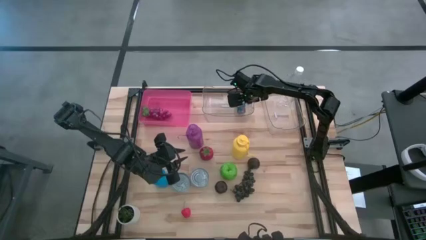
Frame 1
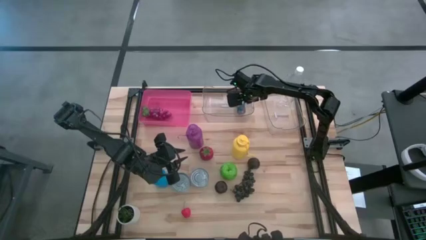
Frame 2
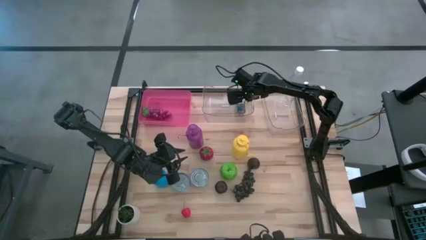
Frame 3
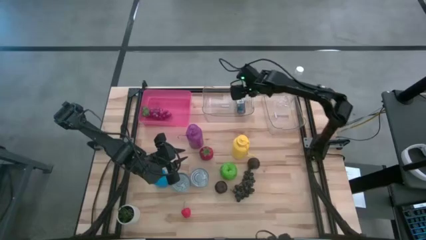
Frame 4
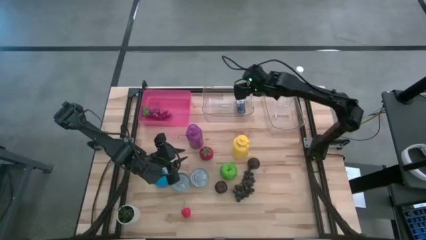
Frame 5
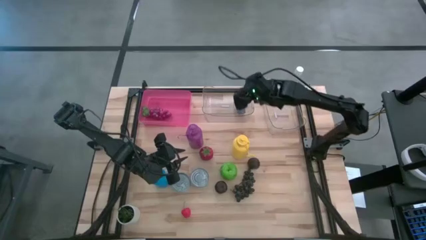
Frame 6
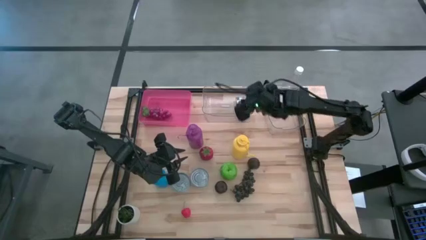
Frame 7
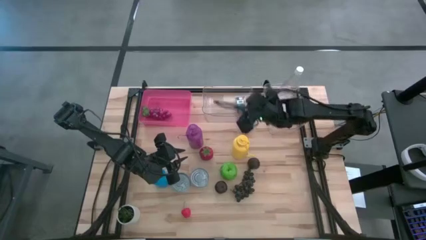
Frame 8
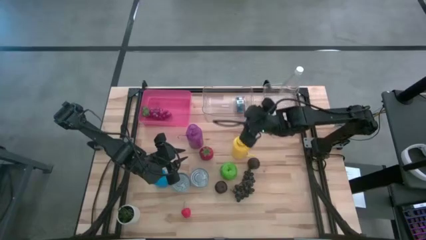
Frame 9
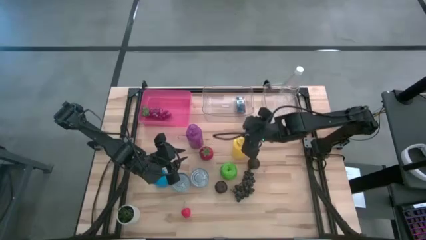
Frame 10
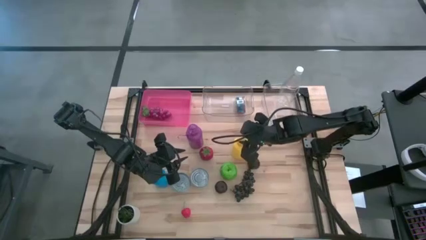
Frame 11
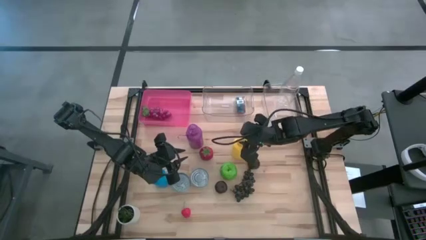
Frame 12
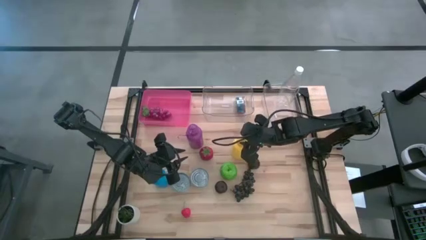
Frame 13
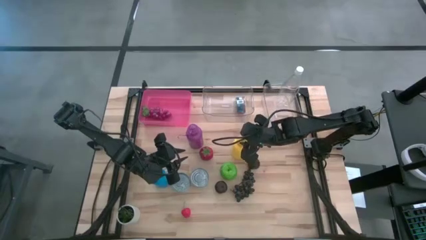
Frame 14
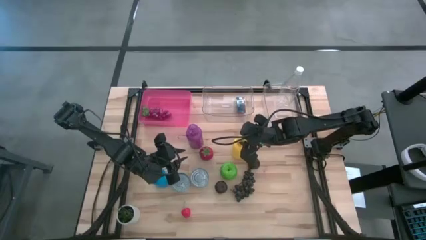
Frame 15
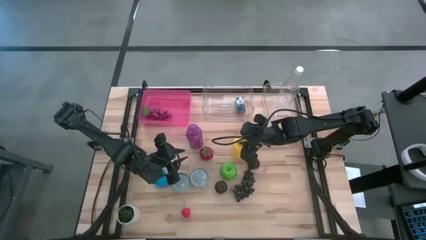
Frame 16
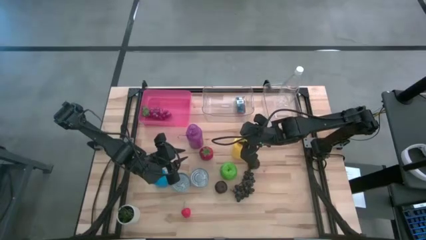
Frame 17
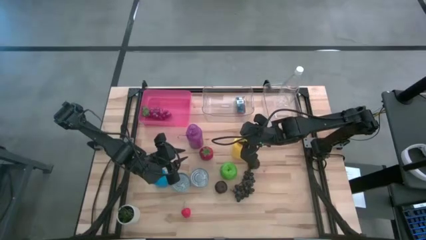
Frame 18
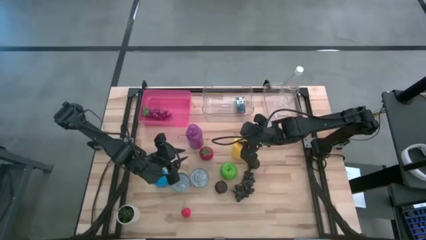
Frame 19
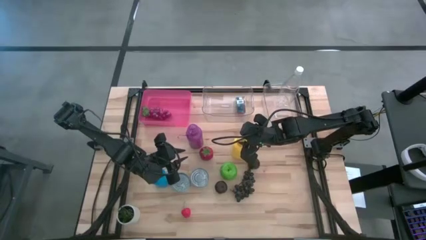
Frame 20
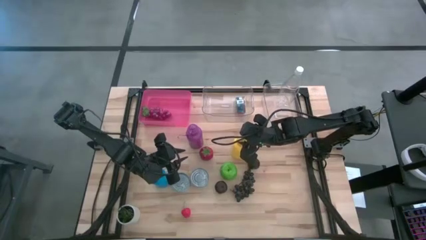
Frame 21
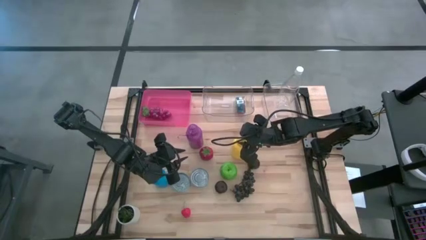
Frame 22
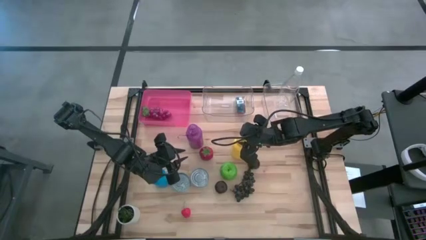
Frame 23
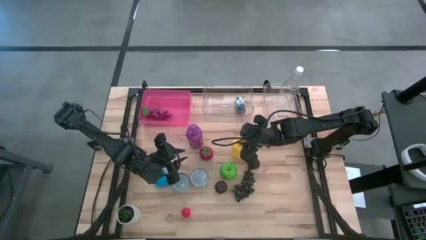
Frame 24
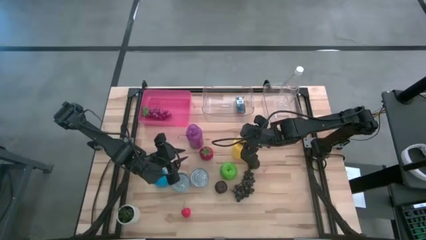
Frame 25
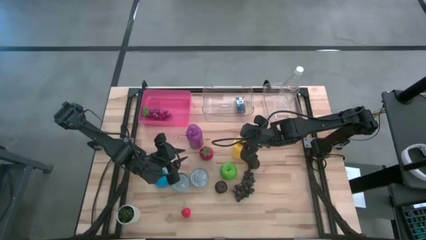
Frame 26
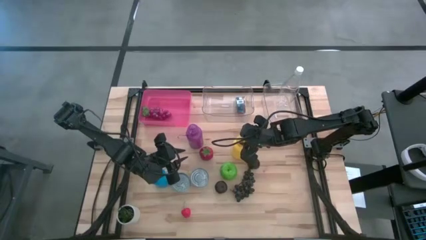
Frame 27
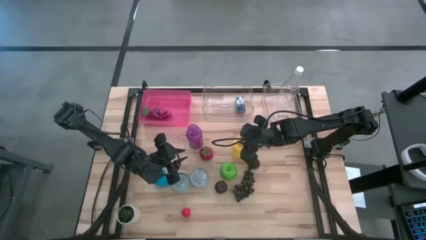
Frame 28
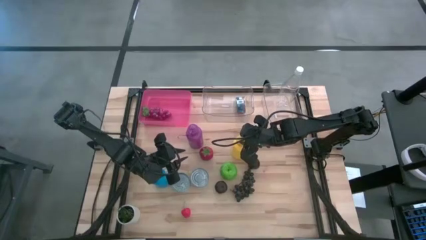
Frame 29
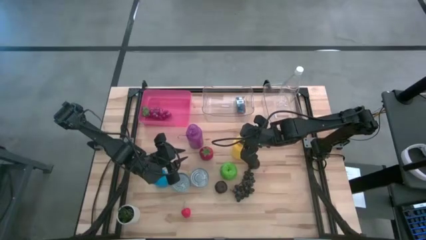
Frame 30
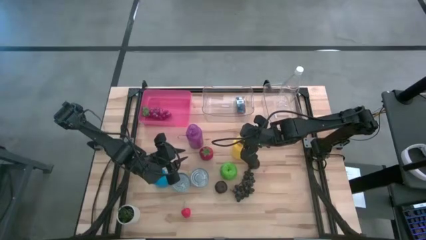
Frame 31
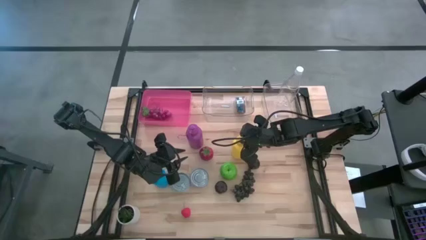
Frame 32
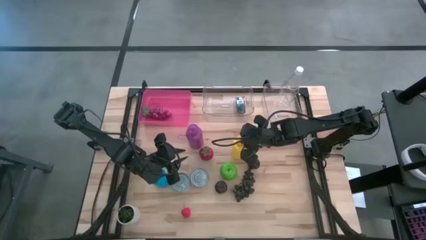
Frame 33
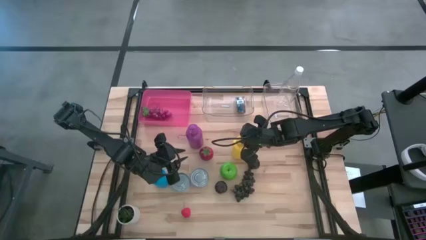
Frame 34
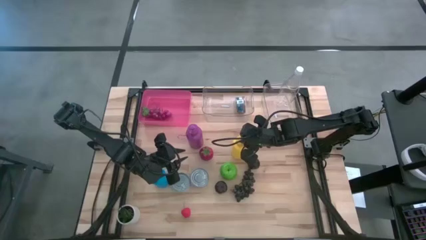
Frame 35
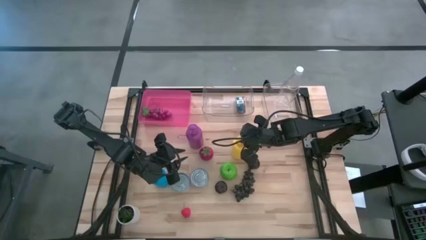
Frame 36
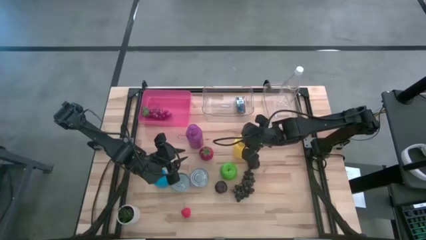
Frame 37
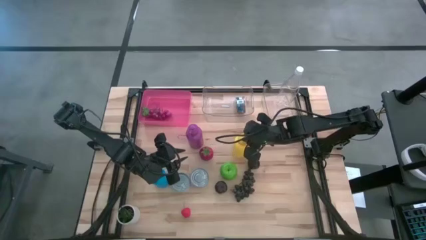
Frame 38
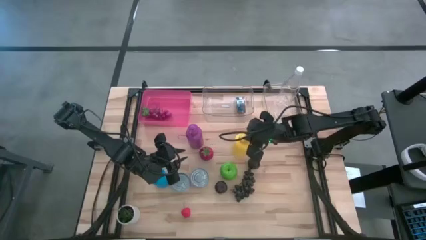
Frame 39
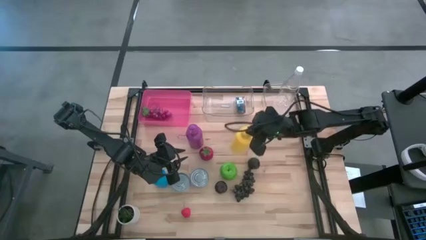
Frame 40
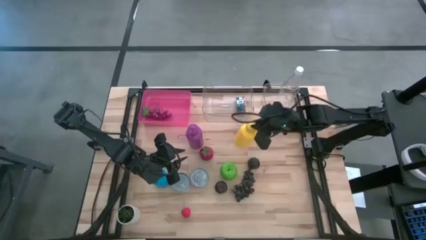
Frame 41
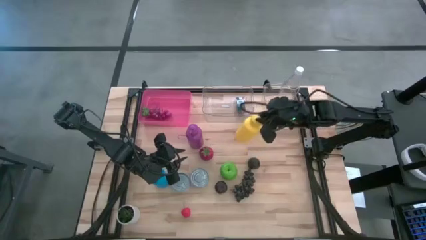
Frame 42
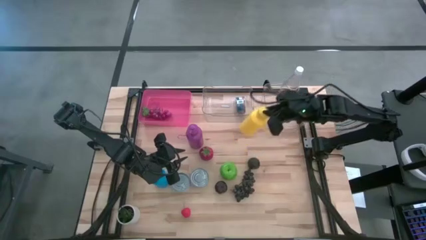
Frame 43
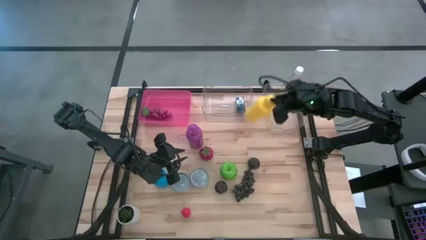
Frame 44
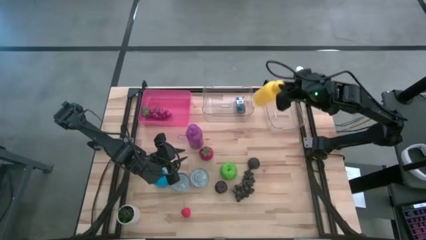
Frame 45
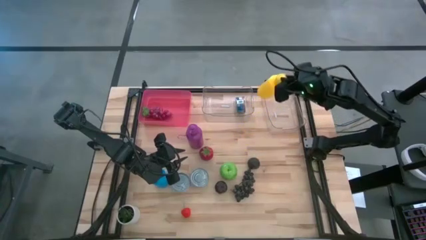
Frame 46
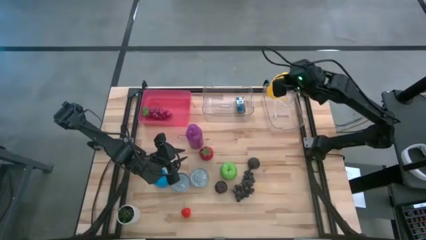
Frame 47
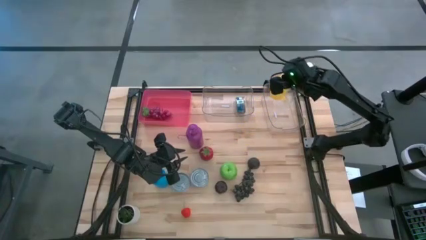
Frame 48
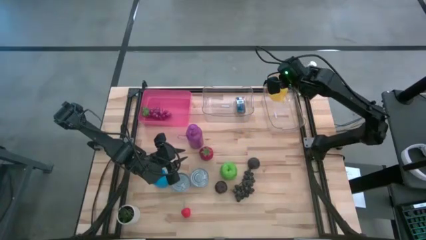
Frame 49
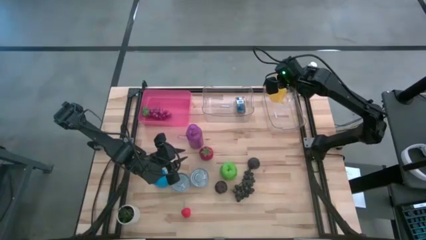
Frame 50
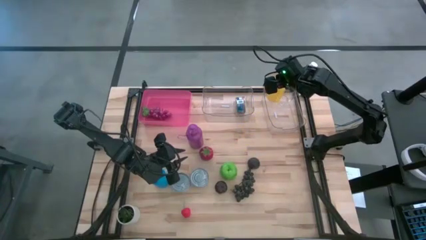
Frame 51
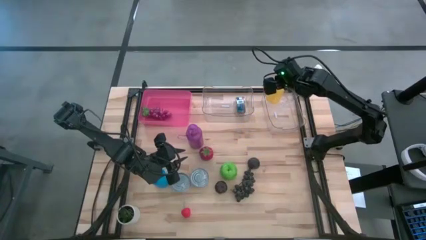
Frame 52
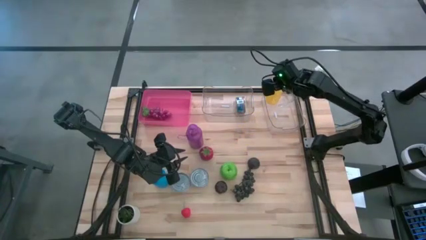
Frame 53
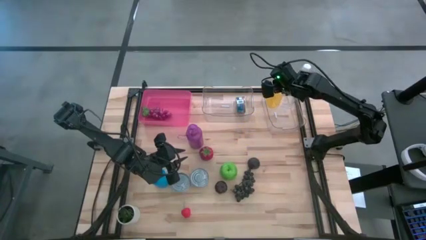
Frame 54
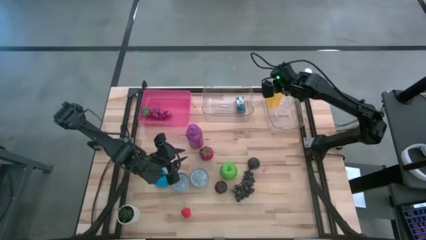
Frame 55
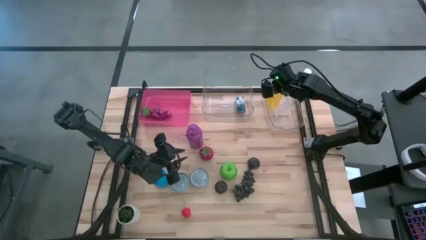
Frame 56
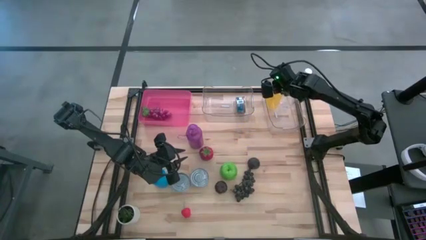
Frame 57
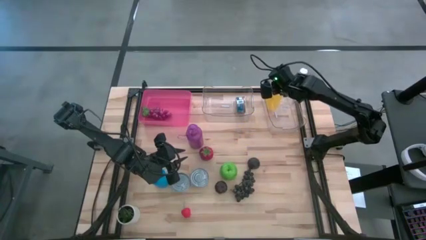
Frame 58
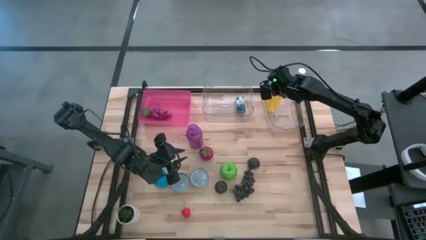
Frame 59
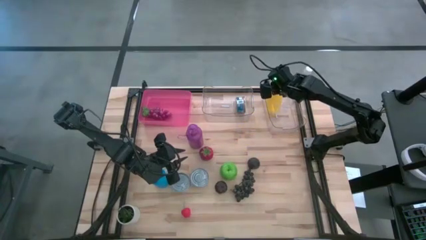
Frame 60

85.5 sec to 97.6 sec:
Task: Pick & Place Food Item
Put the yellow water bottle into the right transparent bin
